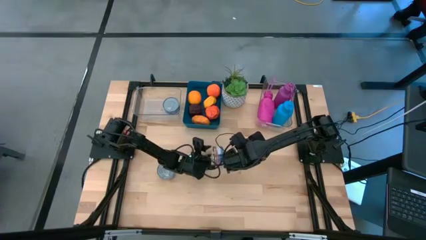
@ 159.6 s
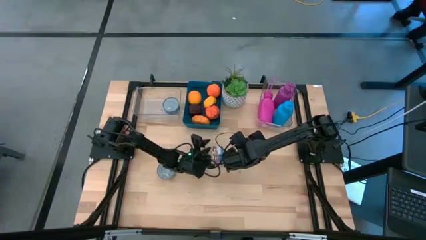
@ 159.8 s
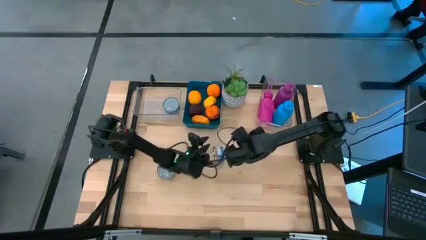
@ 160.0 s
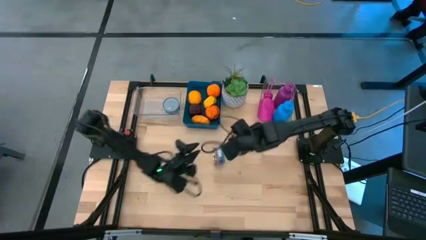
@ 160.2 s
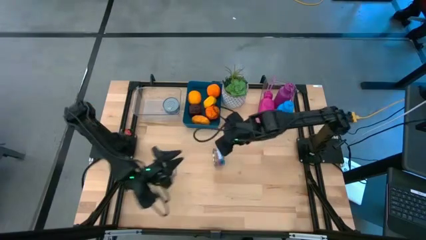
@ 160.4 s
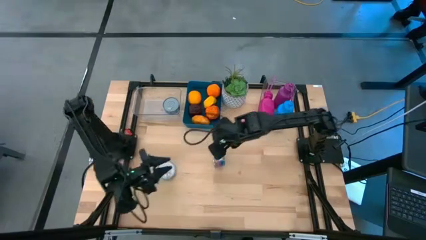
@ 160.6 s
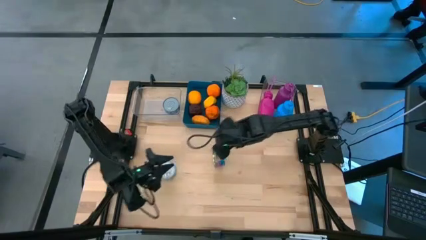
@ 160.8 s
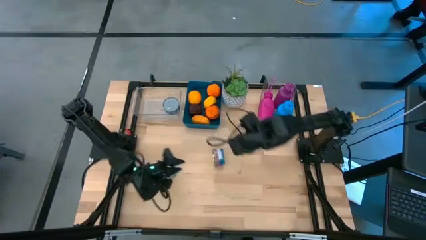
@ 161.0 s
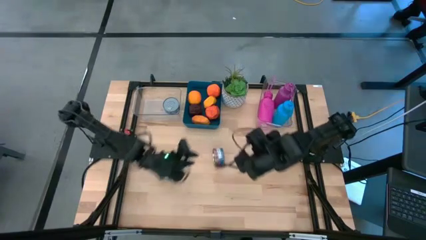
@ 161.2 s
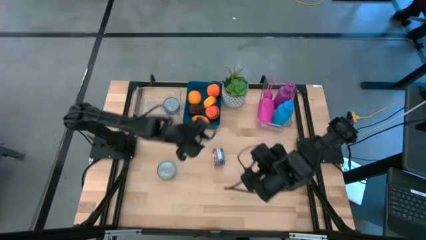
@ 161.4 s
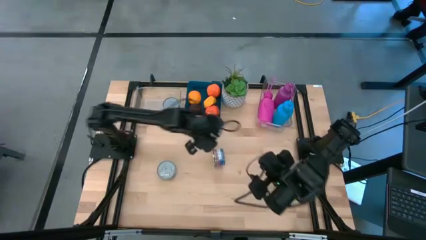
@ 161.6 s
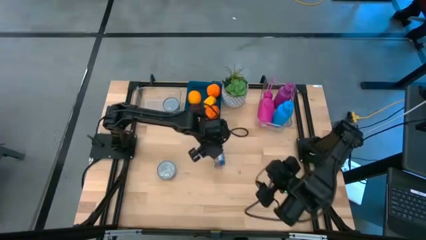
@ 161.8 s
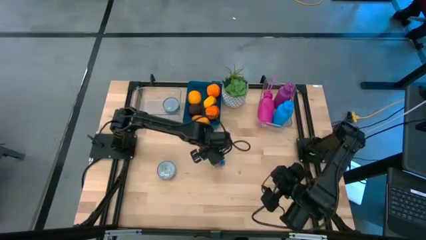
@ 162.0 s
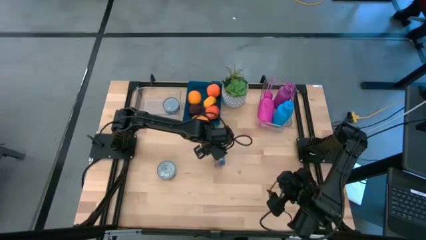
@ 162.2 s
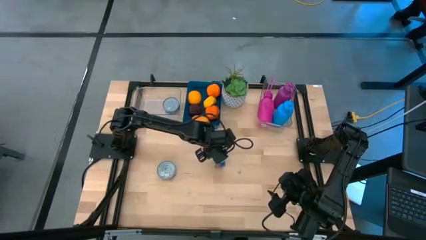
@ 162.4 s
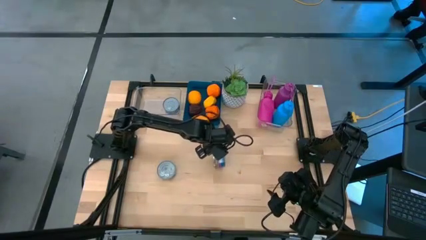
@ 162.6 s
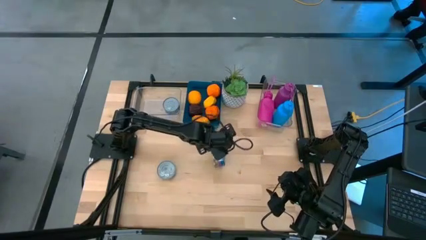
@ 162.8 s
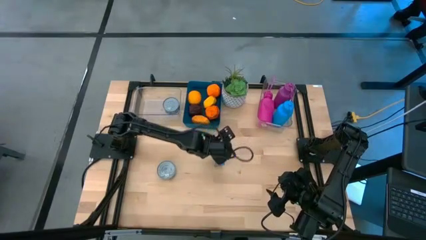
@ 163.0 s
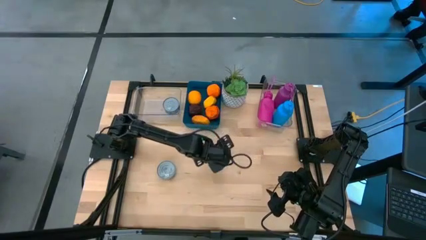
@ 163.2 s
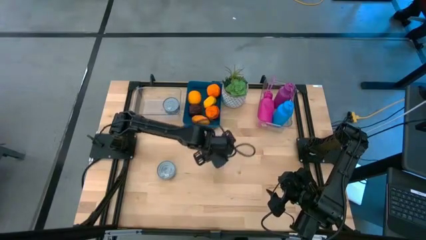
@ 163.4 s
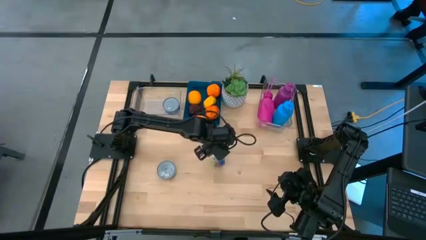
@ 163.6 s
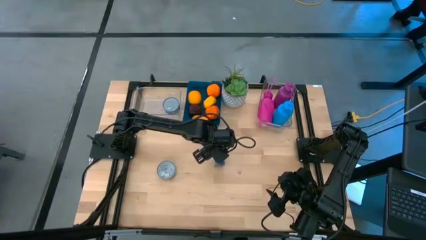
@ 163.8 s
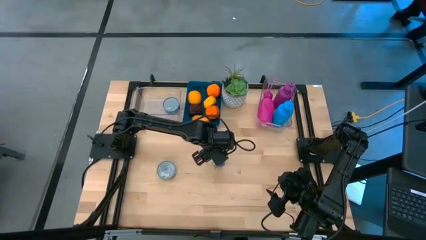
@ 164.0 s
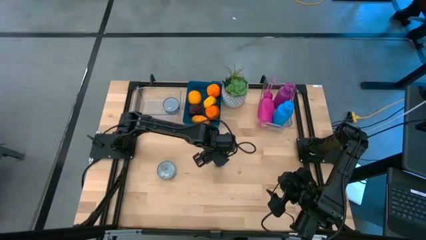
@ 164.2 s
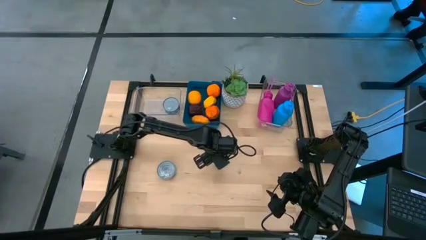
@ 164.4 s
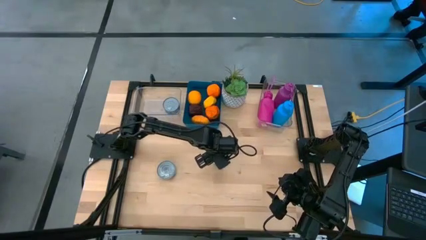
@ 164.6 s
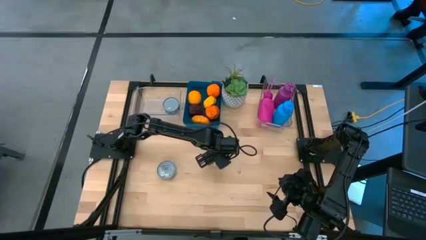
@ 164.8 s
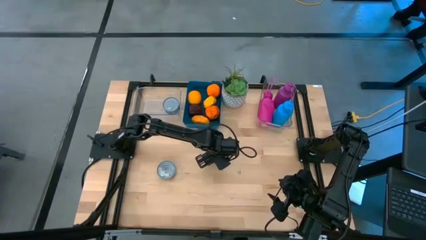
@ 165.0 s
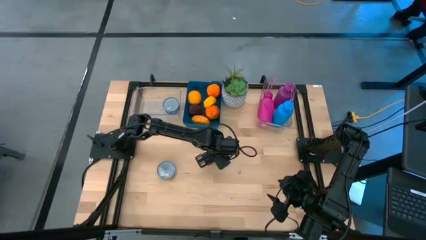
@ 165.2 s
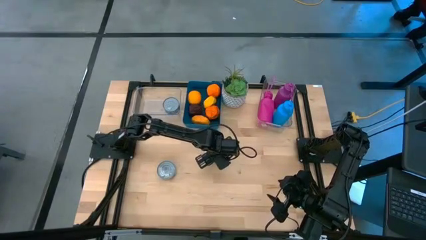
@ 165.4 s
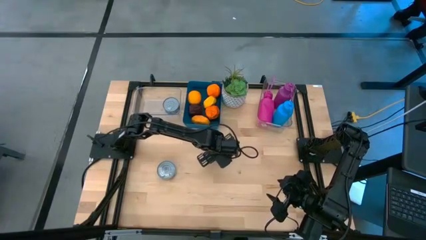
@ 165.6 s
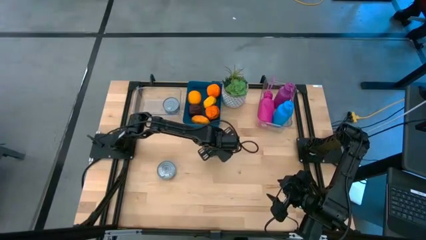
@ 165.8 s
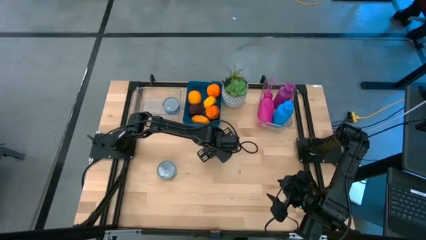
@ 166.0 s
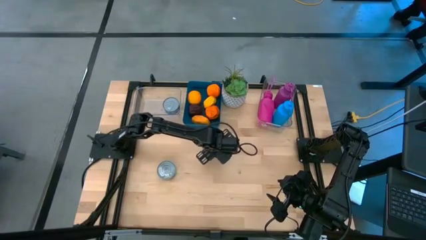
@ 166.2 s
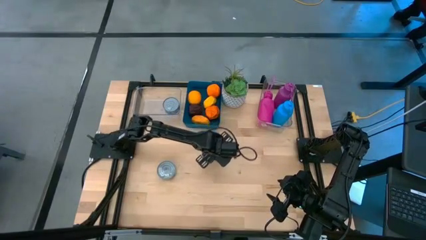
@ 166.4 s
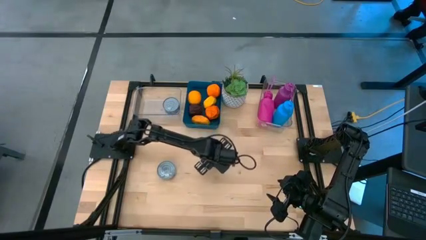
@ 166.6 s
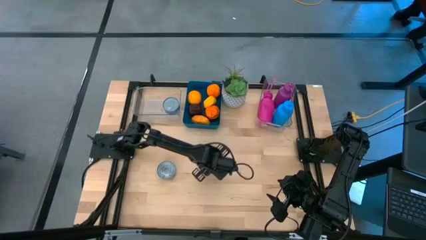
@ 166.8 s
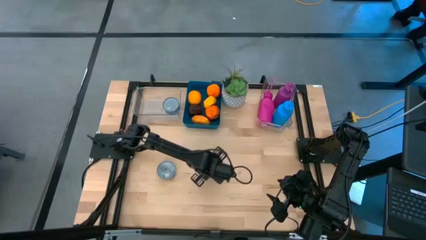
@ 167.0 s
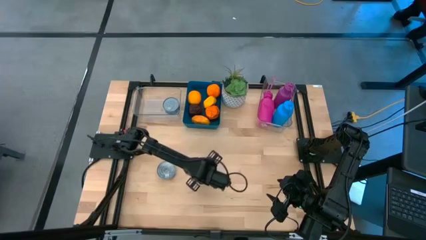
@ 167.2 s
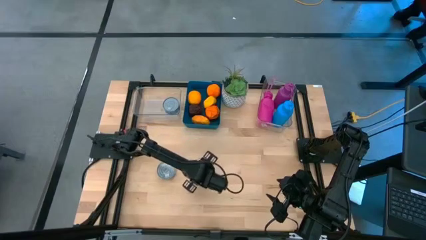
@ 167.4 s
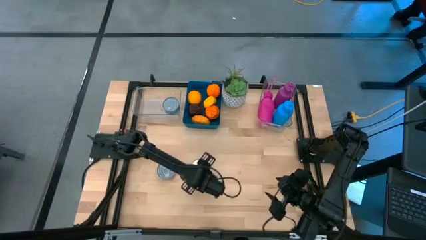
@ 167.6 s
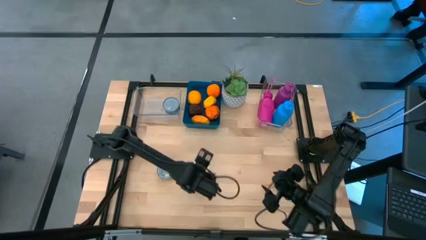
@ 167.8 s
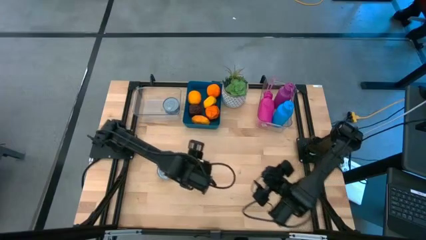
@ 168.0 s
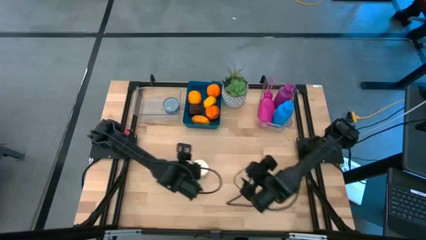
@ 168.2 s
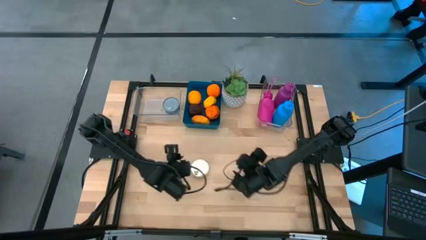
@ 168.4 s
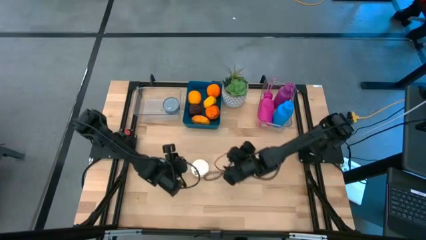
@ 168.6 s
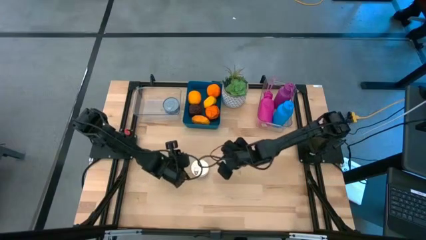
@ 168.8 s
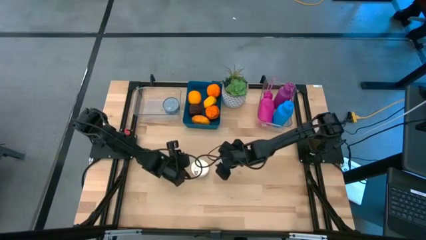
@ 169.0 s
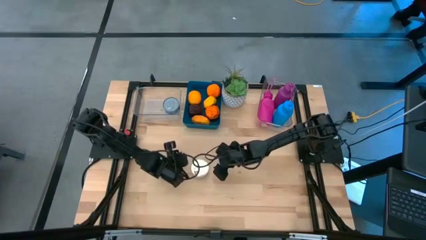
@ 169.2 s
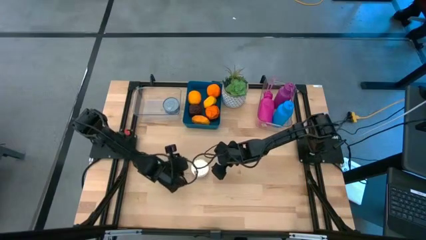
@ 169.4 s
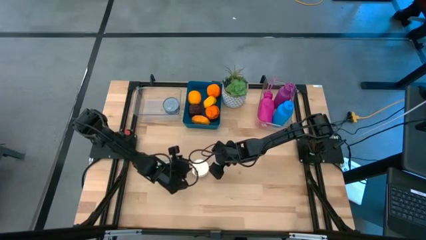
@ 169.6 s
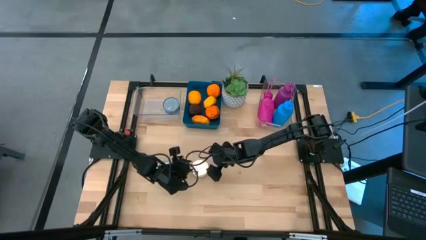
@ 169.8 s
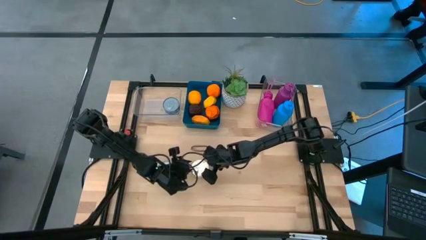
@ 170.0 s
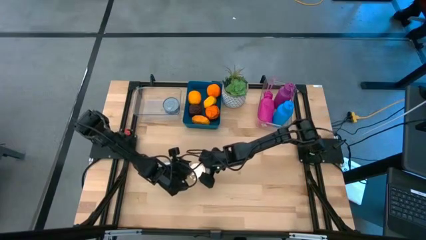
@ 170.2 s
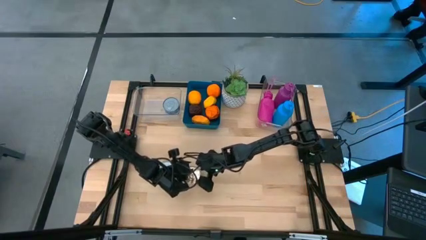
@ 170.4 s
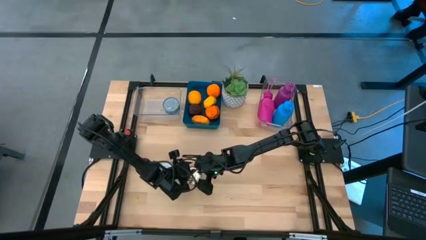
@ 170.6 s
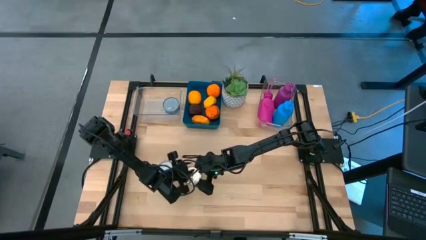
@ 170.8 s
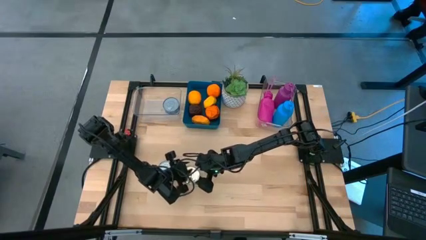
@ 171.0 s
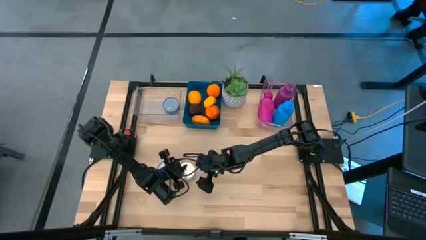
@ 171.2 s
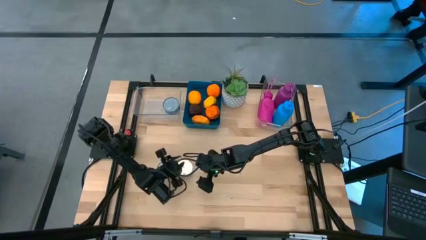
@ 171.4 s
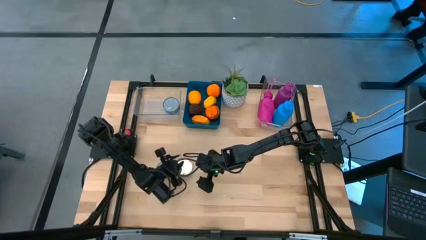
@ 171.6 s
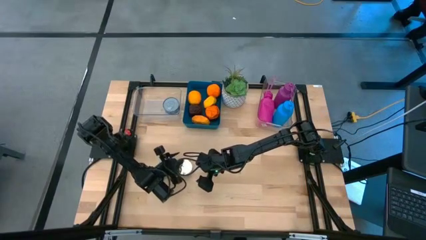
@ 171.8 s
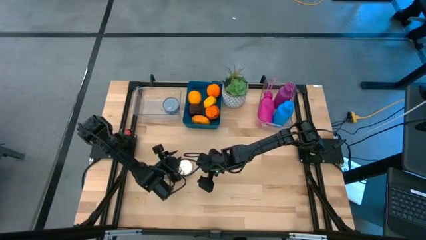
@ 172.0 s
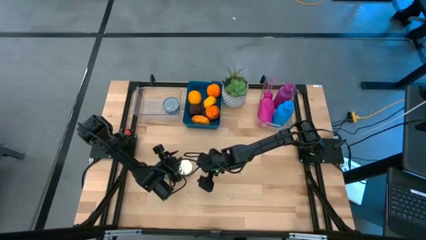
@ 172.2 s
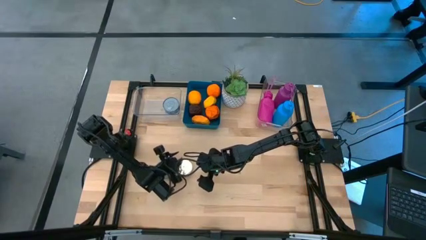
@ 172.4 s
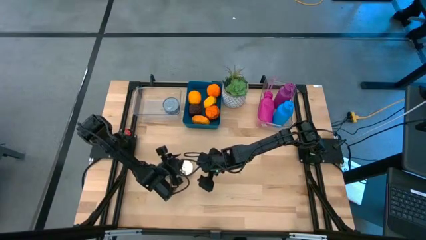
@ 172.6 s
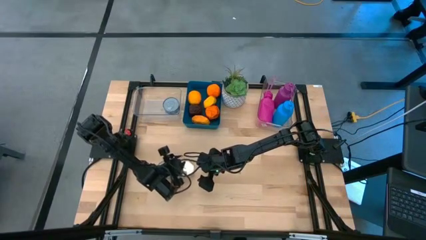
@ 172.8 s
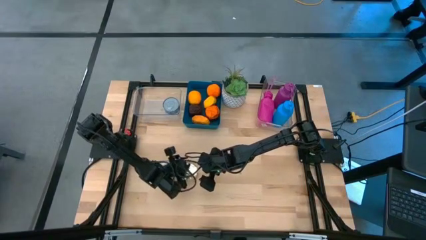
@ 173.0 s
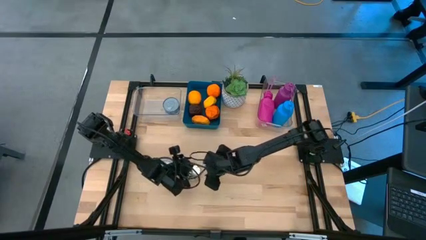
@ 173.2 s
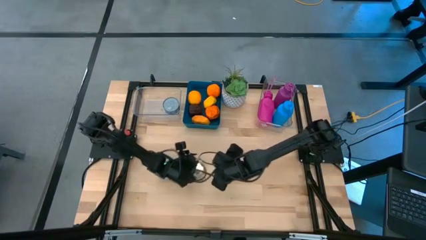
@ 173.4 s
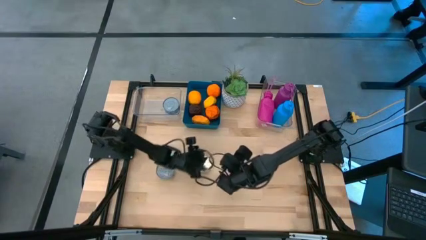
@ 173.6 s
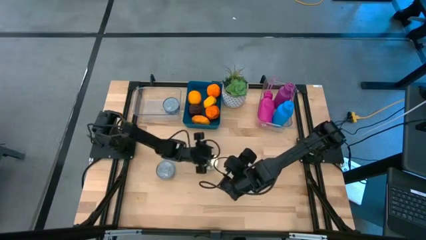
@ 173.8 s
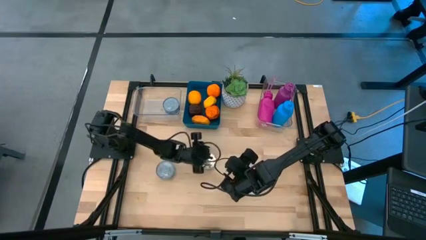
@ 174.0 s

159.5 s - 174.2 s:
Task: Pick & Place Food Item
Stack the blue and pink tuna can on top of the blue tuna can into the left transparent bin
